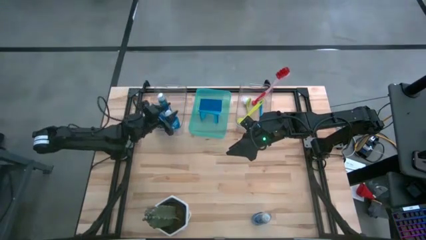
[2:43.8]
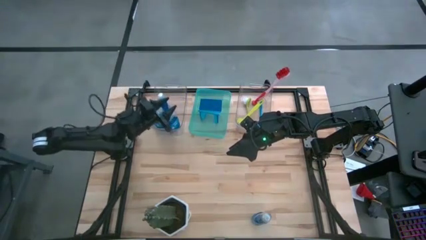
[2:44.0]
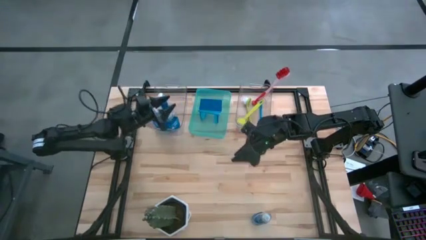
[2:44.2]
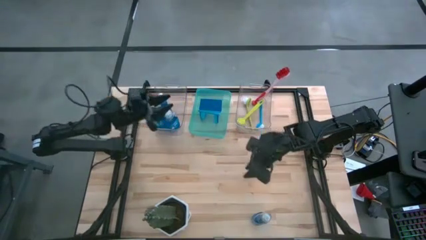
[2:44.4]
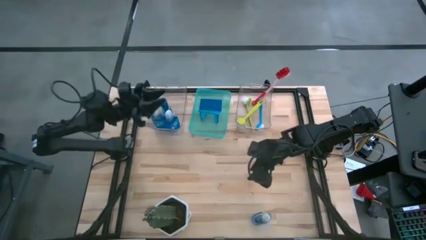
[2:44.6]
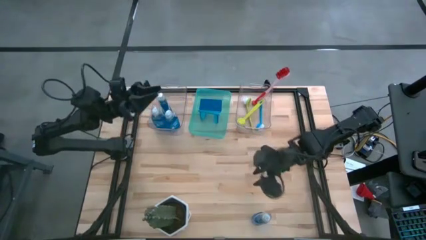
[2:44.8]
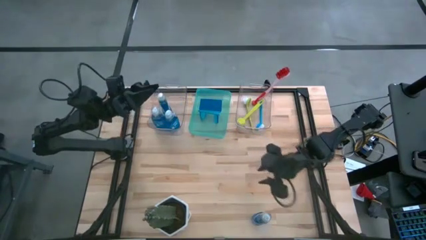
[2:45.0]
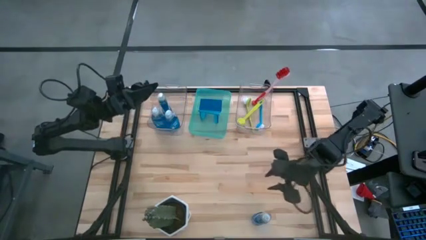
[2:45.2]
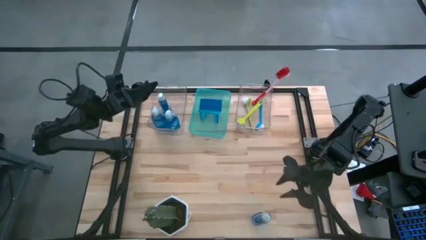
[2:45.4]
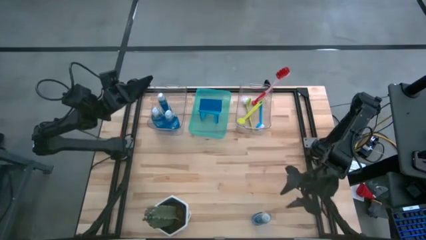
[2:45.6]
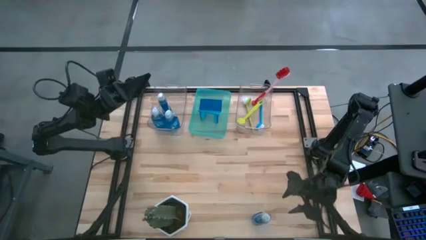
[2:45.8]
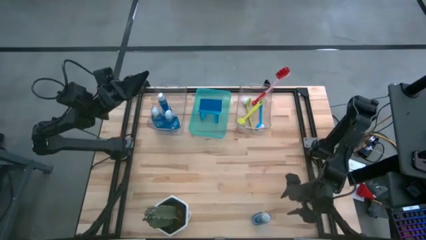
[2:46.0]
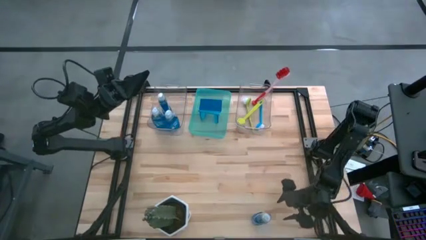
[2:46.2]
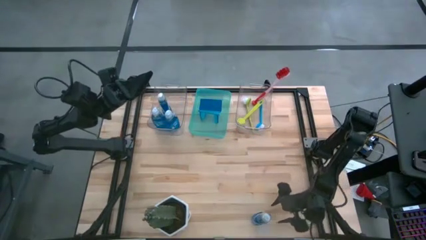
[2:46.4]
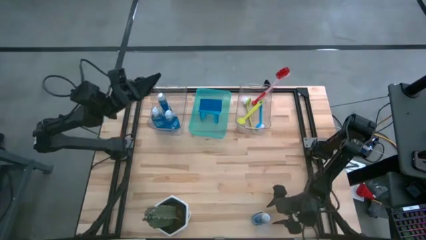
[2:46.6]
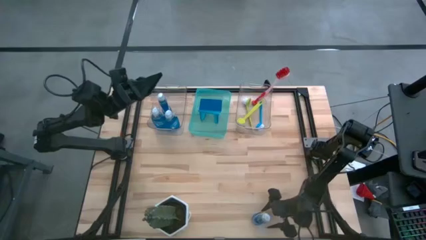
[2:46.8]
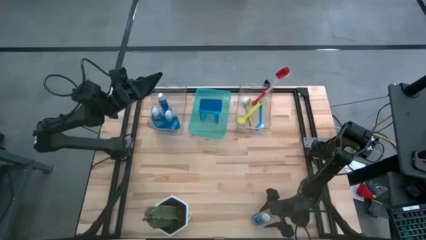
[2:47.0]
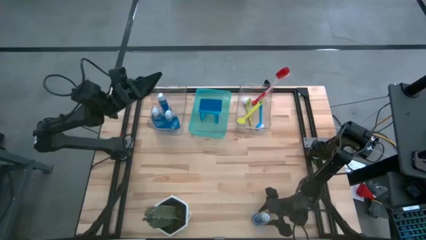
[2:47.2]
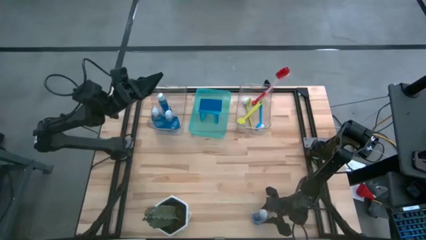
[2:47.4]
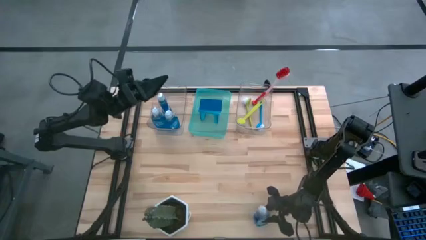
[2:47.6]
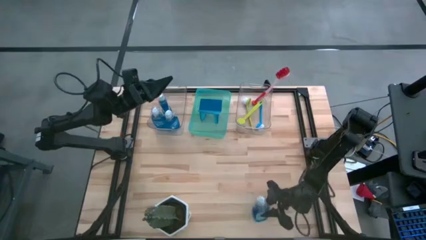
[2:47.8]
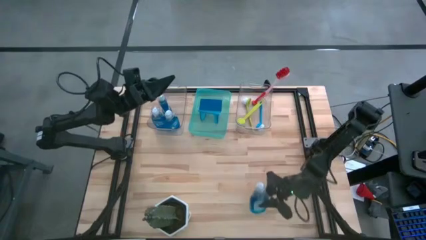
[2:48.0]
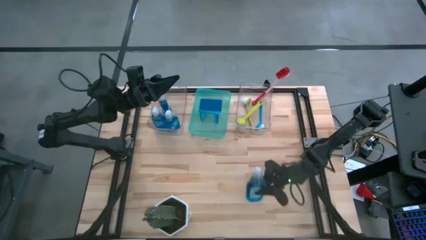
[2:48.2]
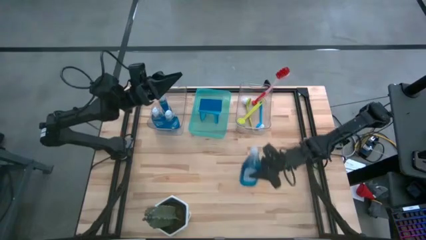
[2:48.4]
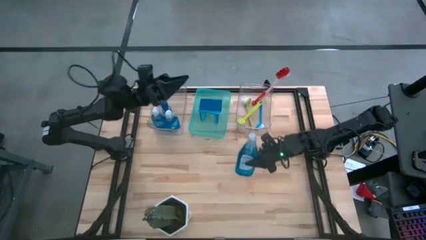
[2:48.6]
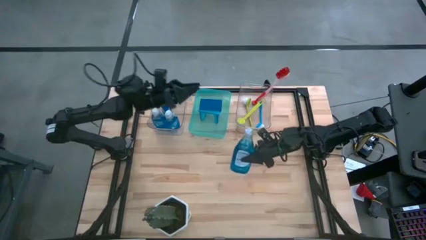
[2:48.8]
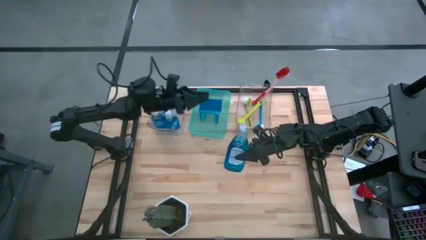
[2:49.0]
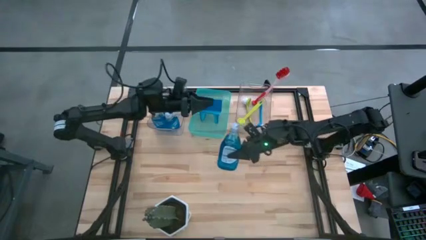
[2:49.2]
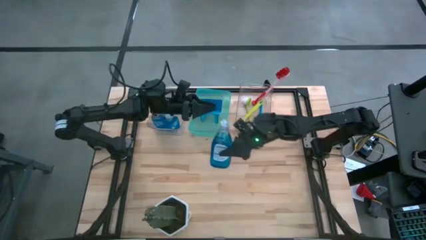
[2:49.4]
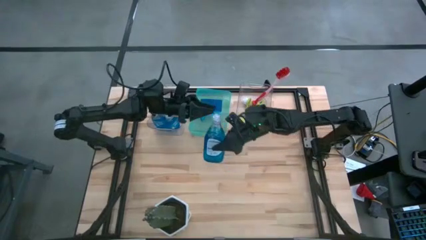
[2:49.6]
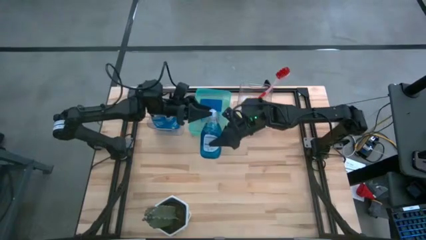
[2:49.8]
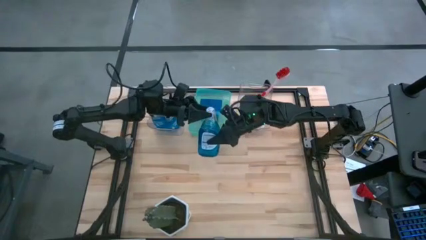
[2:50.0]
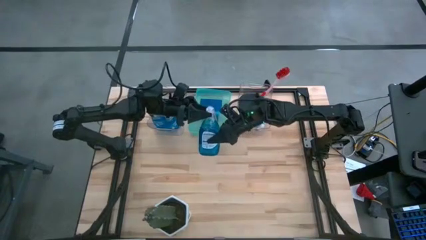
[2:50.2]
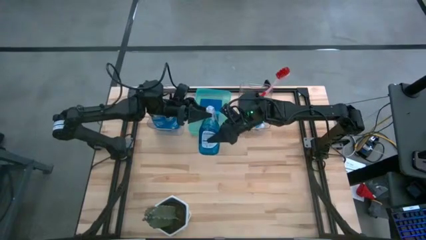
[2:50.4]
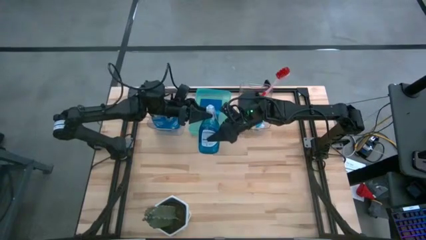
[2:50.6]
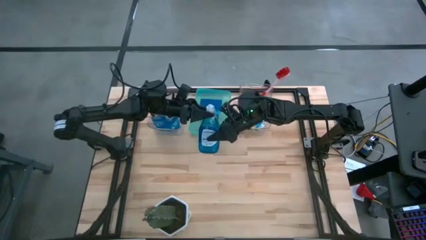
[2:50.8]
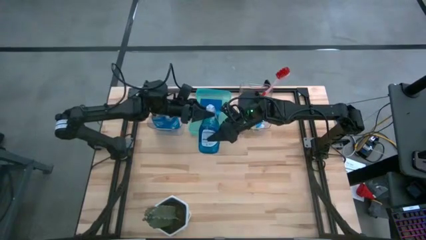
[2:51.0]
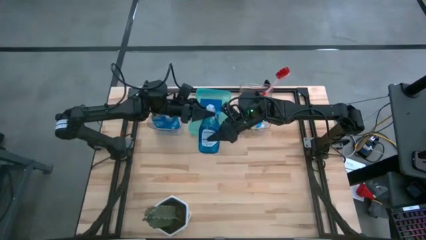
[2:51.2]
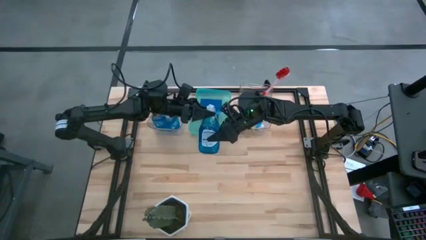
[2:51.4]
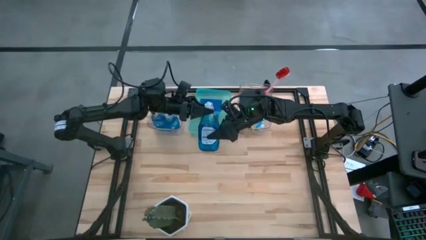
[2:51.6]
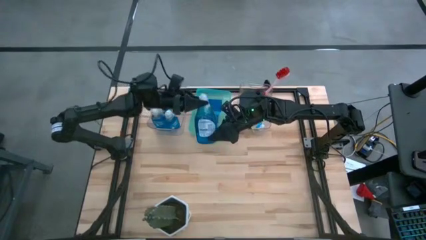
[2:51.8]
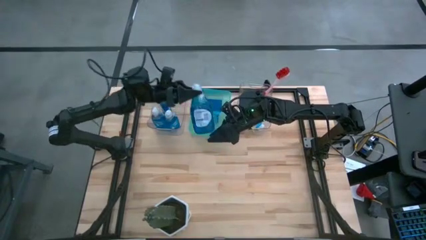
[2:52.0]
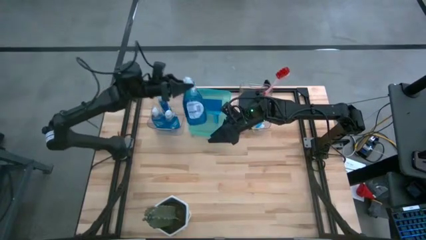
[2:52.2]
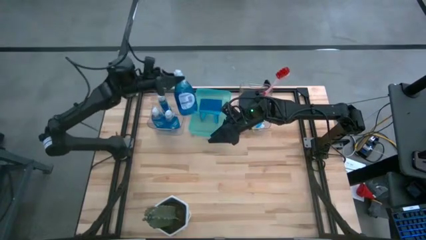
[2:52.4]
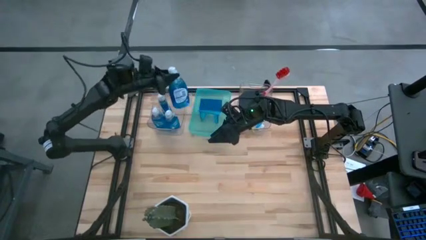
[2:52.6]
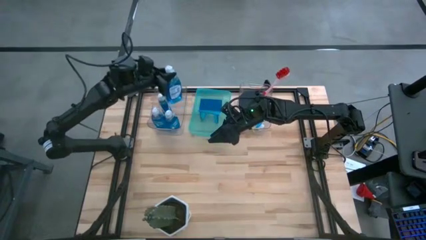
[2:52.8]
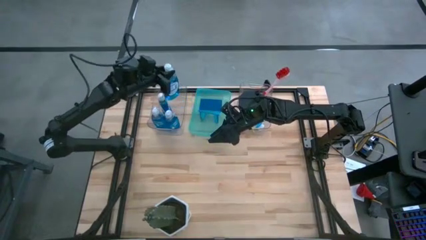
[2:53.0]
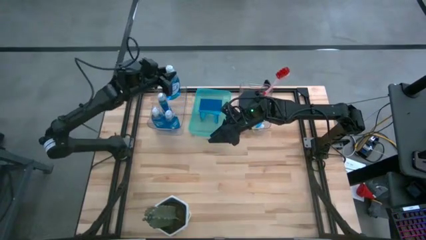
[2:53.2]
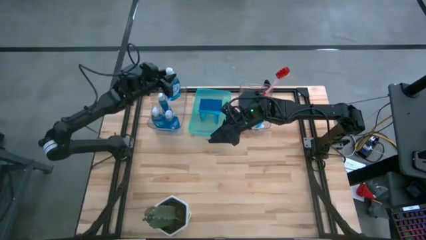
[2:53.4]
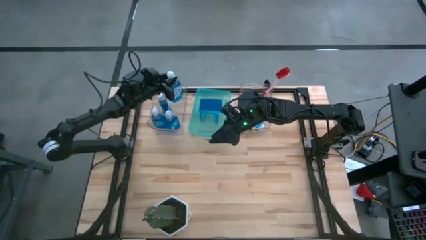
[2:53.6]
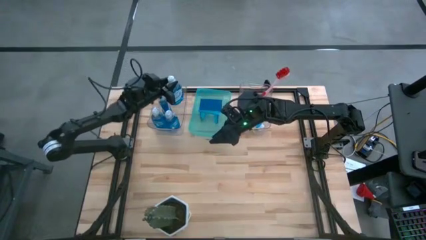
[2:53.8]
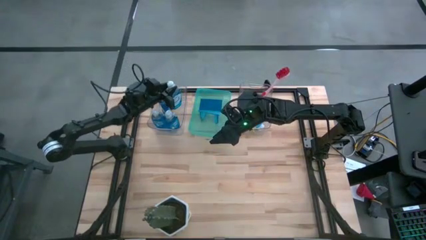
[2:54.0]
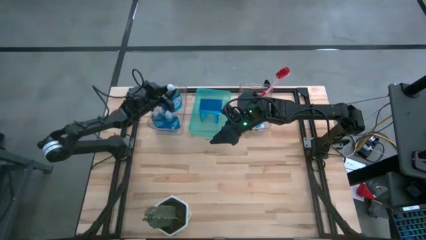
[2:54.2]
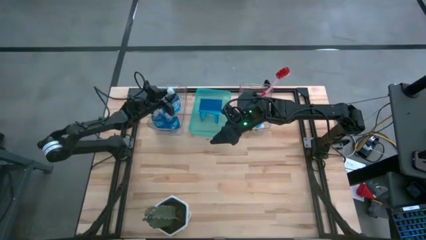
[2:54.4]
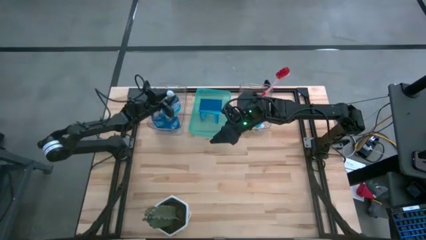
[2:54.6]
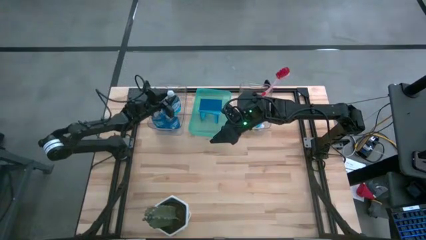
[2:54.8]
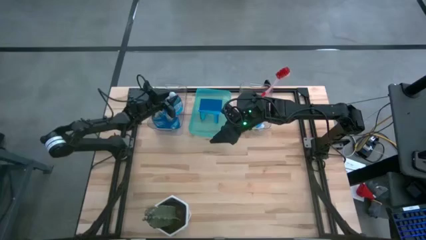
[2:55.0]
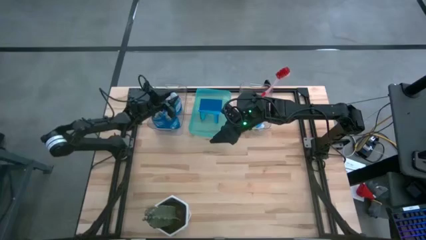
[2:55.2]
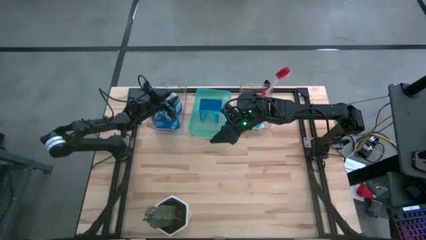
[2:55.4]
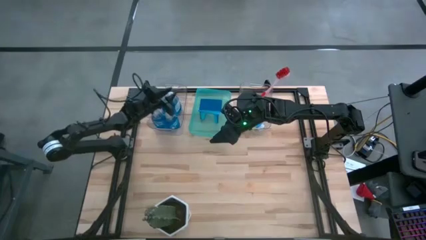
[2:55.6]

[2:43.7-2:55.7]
Task: Pick & Place Kitchen Sink Supplies
Put the dishwashing liquid into the left transparent bin

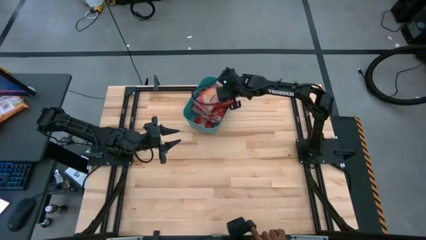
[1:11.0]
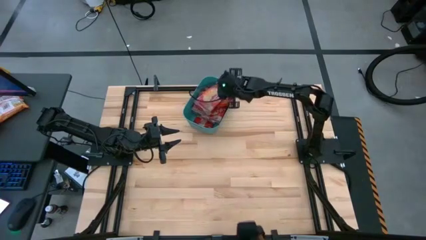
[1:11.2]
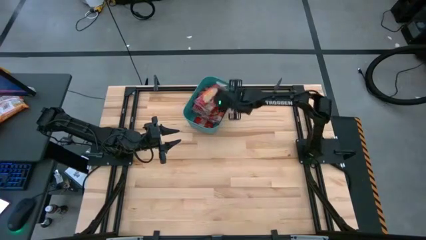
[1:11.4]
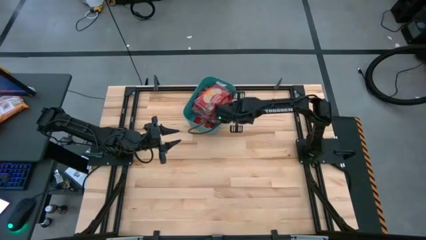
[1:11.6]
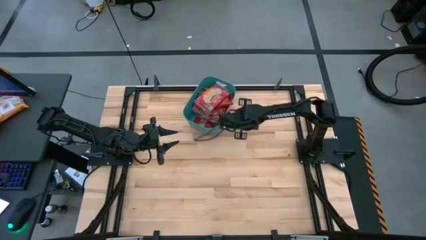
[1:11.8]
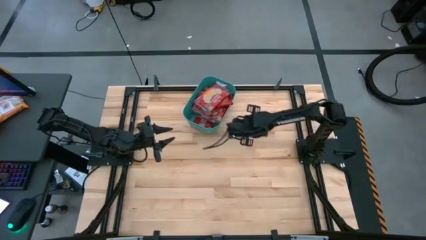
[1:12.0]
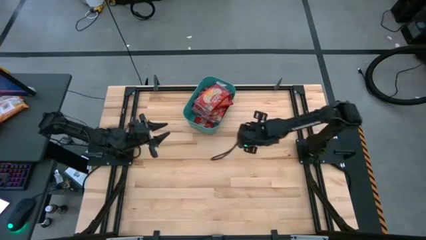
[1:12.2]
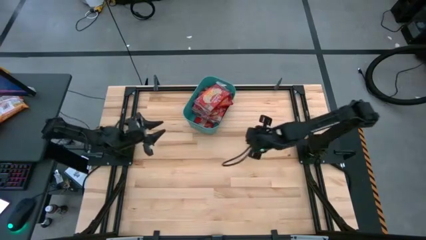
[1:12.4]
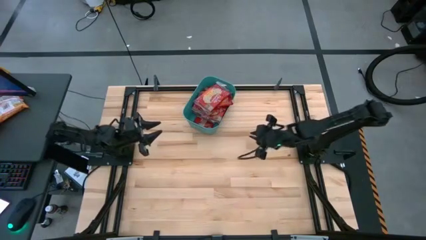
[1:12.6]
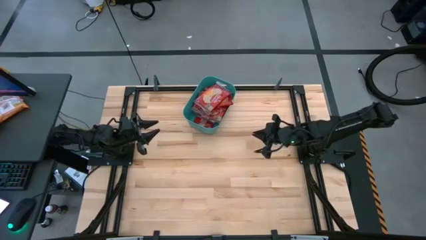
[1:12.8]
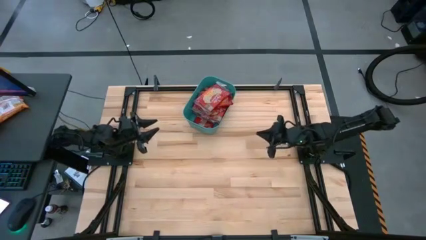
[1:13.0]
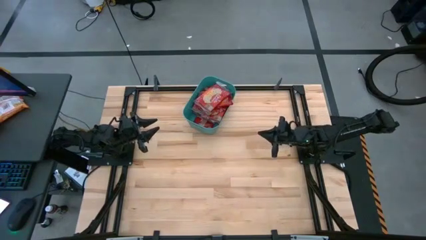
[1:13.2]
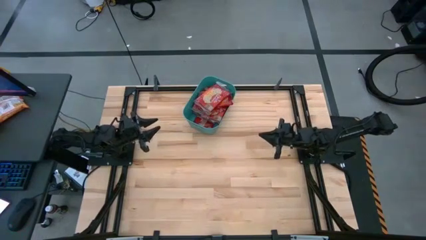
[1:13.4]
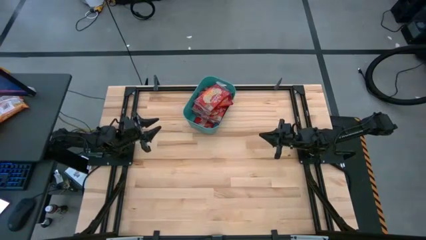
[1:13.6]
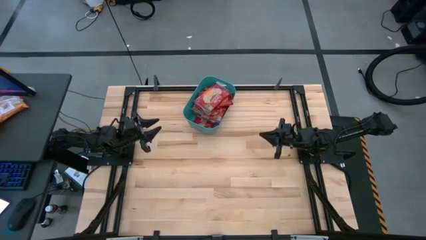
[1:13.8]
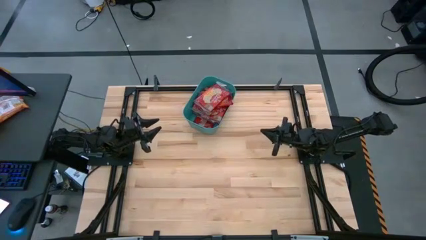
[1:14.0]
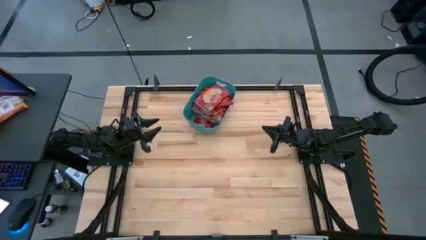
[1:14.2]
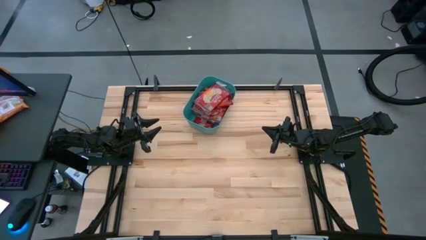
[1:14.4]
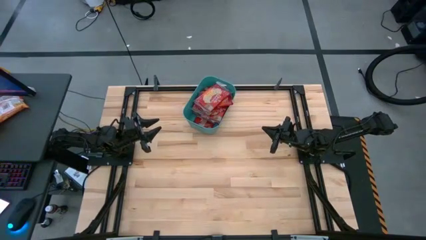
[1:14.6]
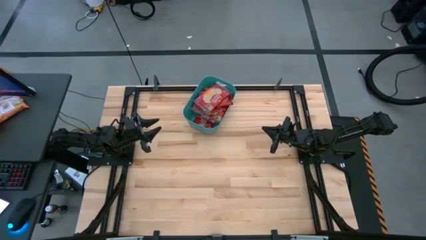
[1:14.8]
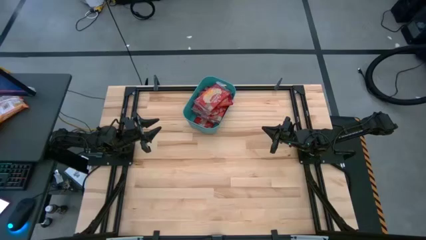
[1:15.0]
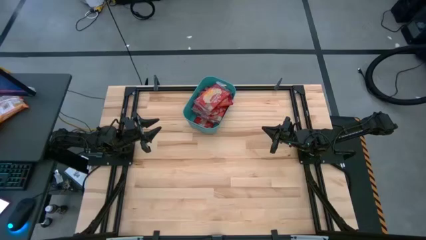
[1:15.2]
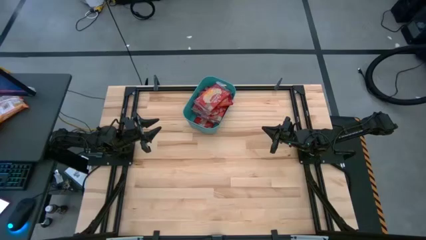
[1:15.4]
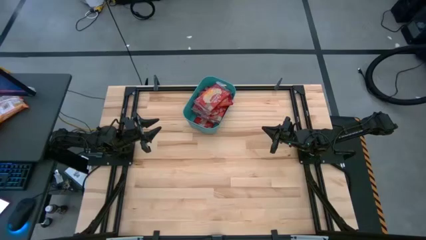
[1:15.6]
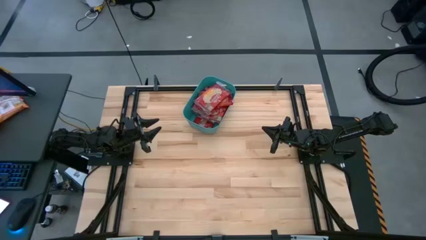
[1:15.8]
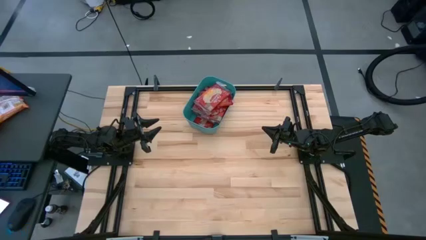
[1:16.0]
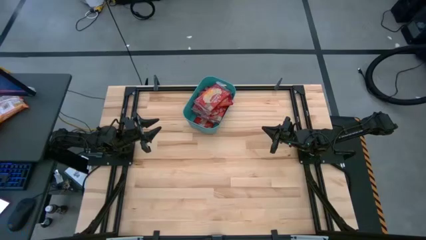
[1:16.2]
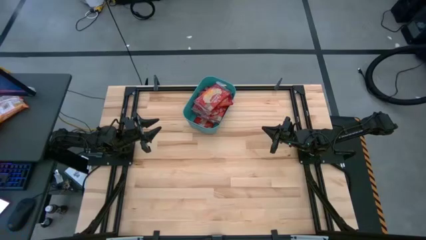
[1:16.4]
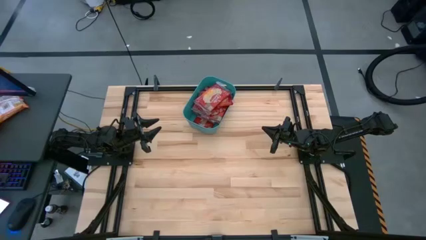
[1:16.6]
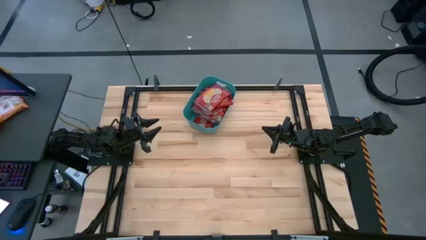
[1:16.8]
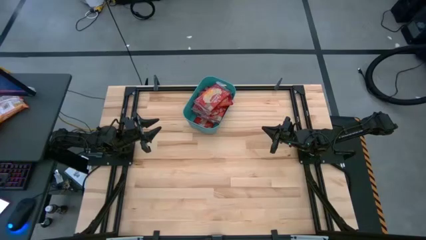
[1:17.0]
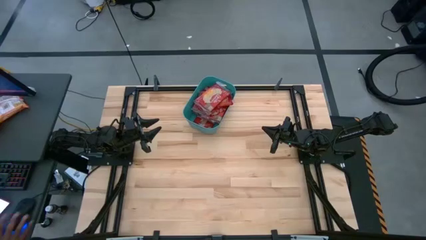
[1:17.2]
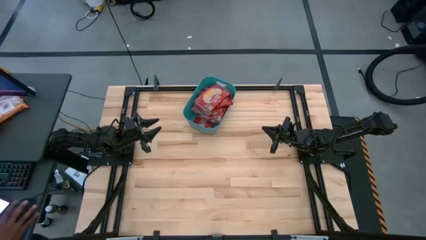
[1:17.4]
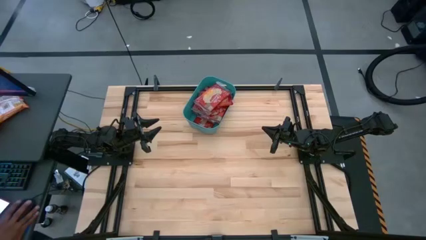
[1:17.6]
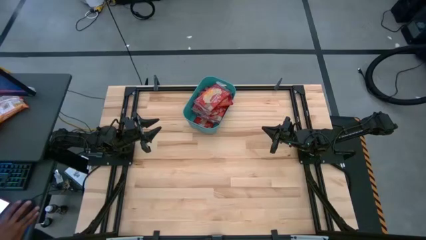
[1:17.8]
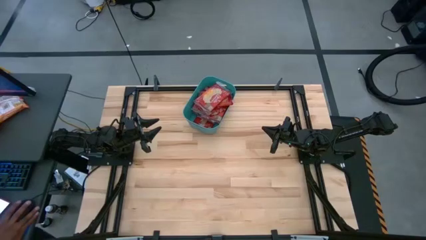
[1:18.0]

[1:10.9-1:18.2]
Task: Sort popcorn bags into baskets
Return to Home Position
